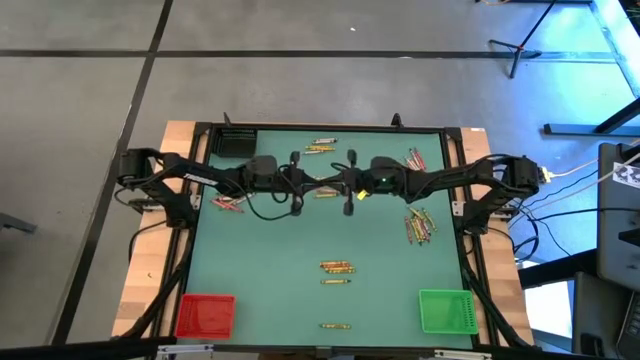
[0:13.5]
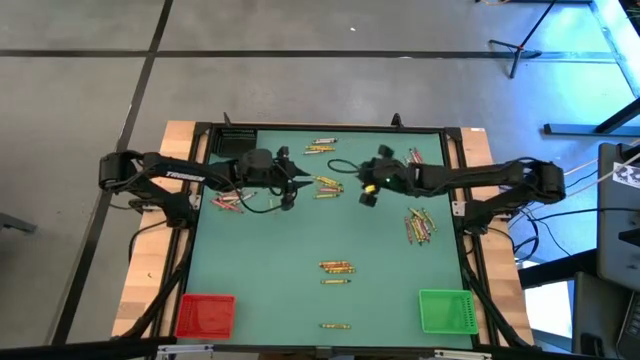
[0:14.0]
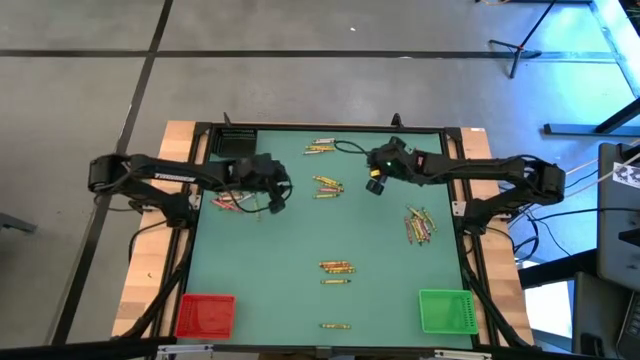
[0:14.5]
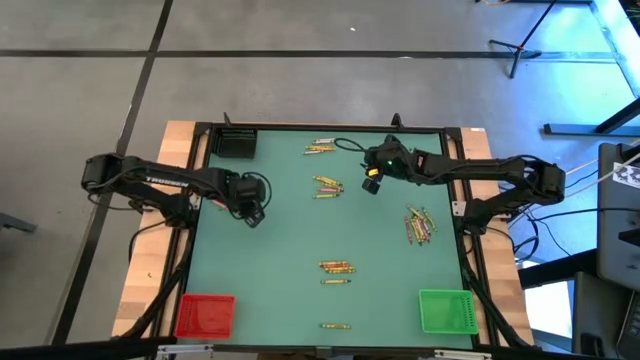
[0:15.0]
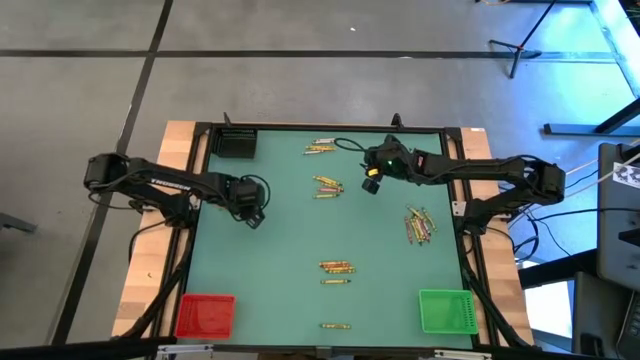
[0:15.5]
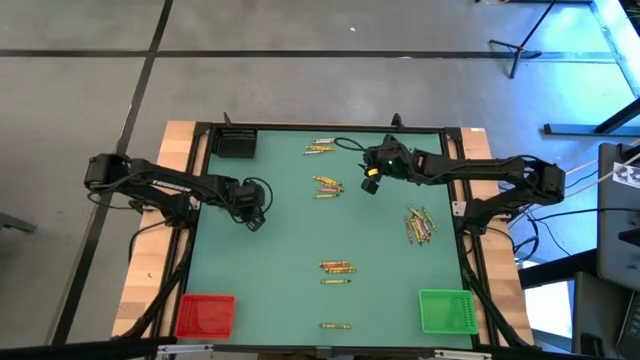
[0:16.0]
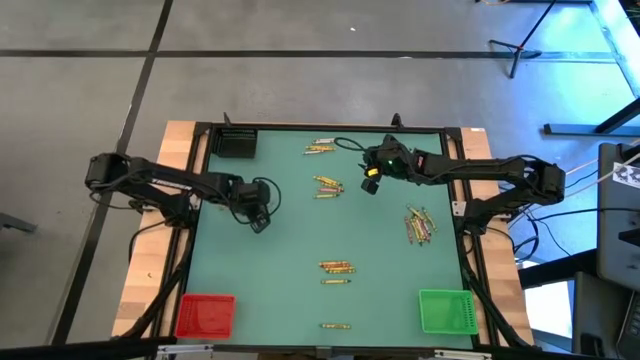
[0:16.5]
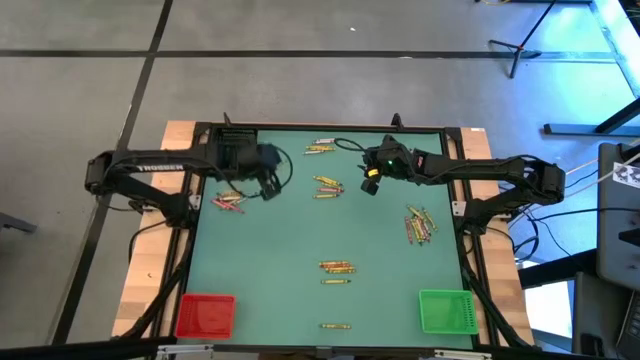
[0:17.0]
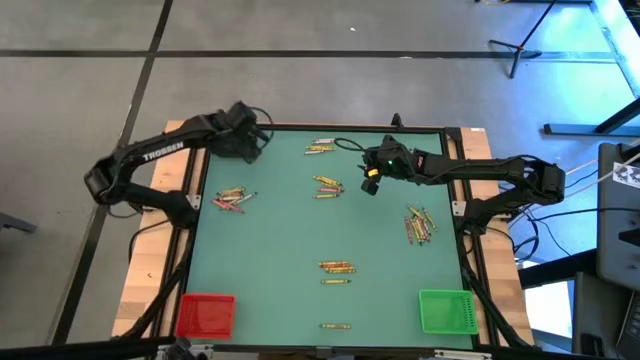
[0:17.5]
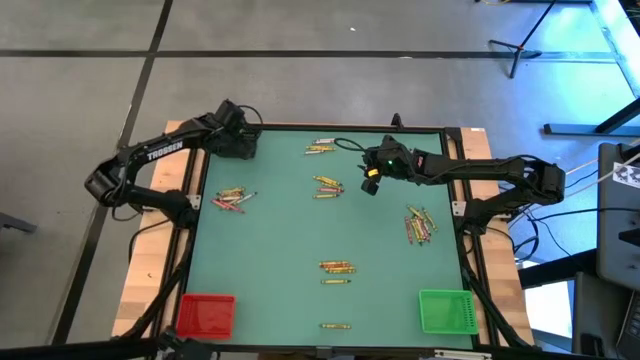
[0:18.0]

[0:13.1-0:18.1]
Task: Sort crayons
Put the green crayon into the black bin

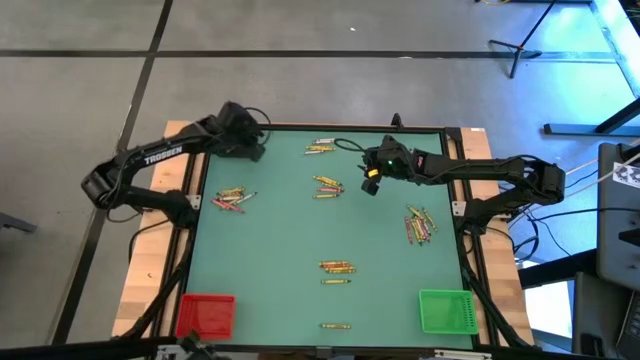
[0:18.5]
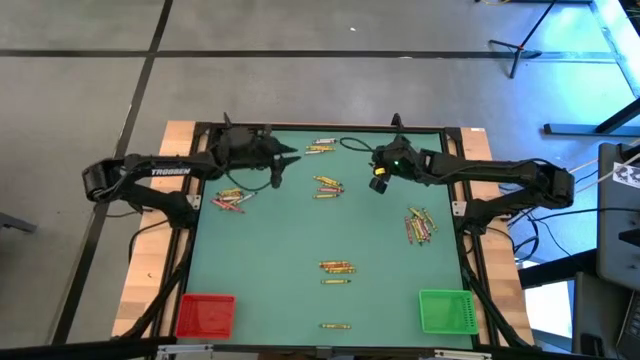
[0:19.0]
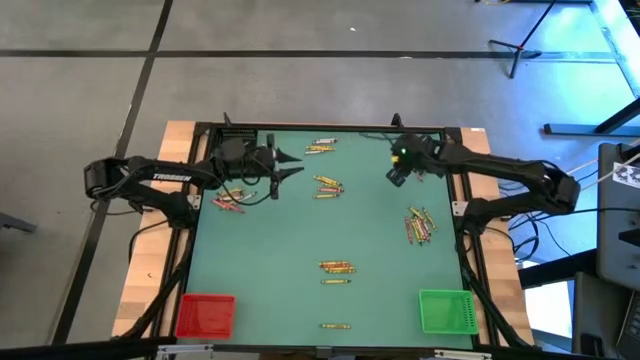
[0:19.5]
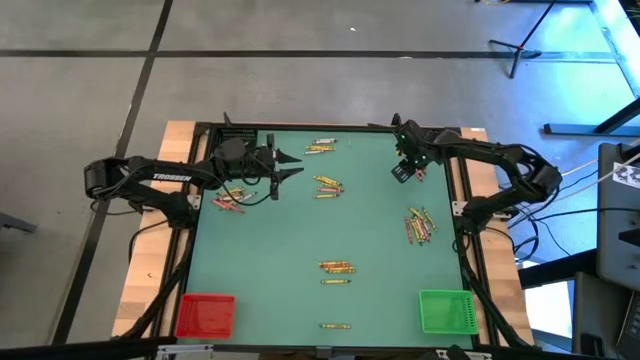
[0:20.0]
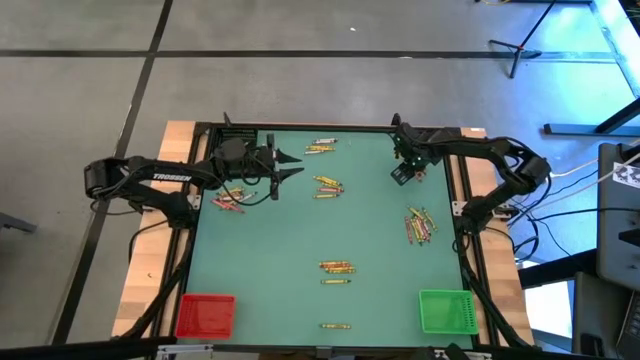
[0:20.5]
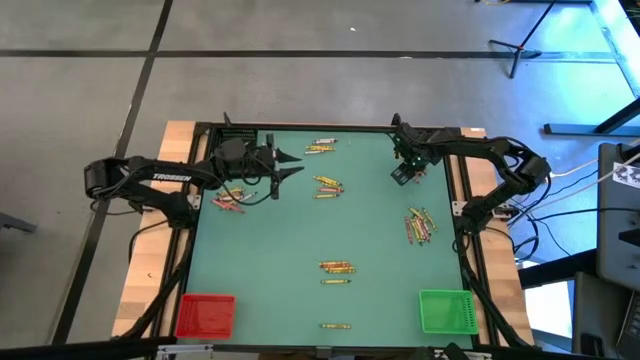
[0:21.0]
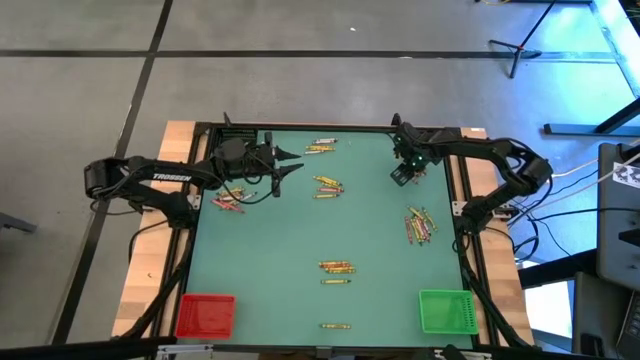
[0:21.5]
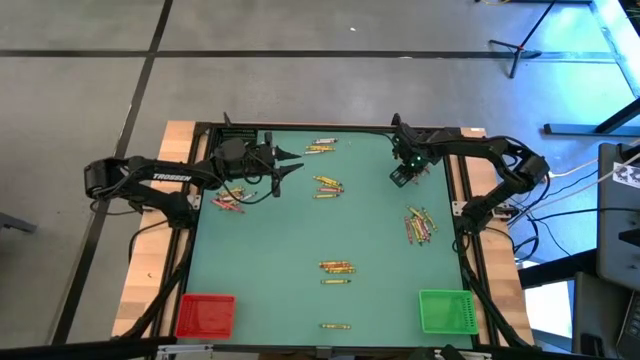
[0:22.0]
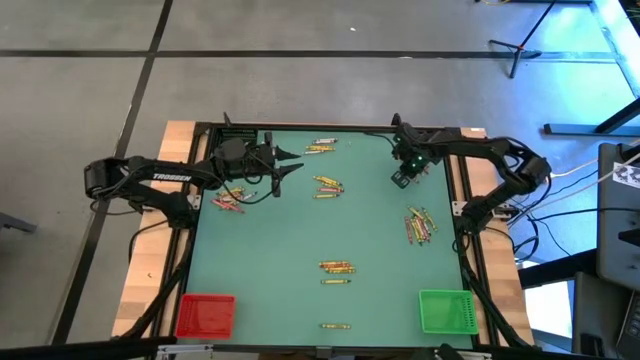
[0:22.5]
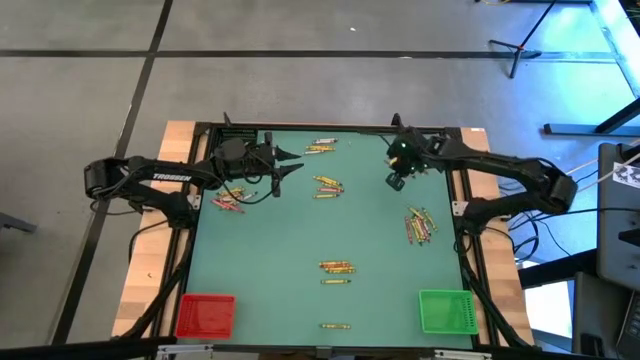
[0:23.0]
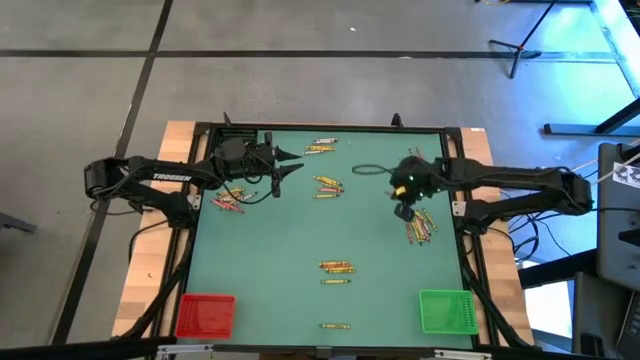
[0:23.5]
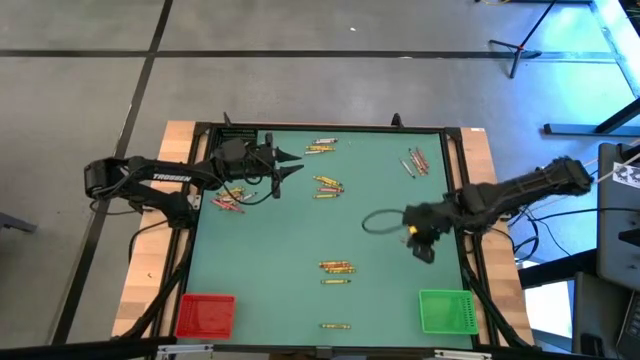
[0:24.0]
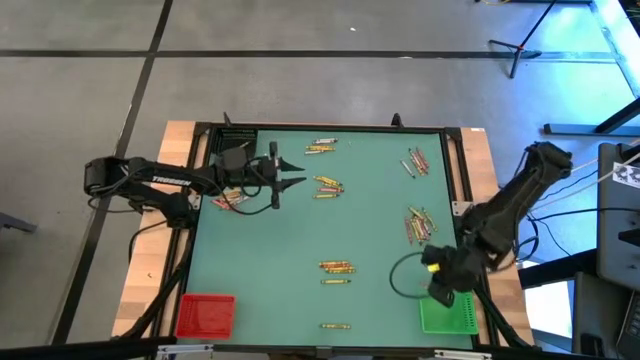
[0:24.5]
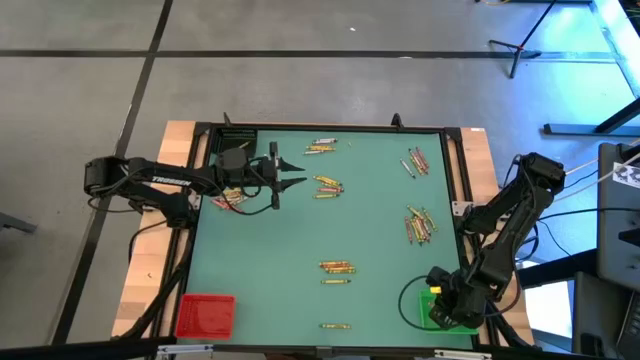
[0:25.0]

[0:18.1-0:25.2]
Put the red crayon into the green bin

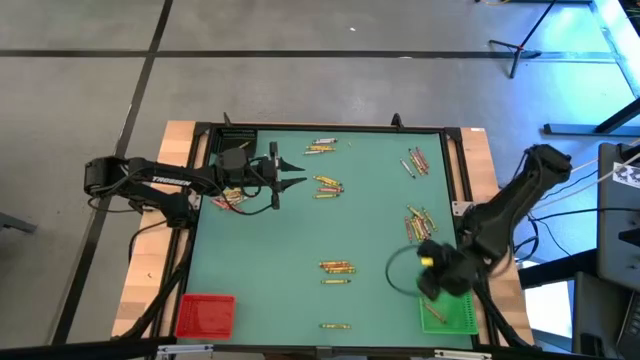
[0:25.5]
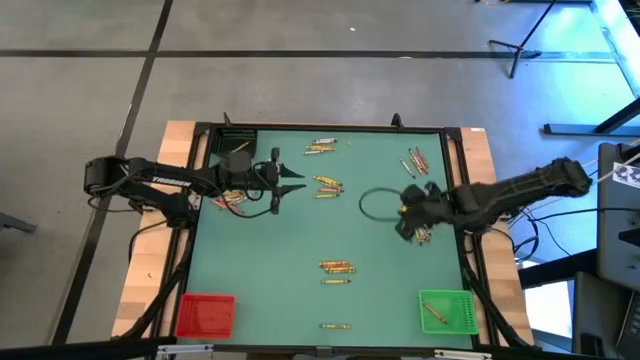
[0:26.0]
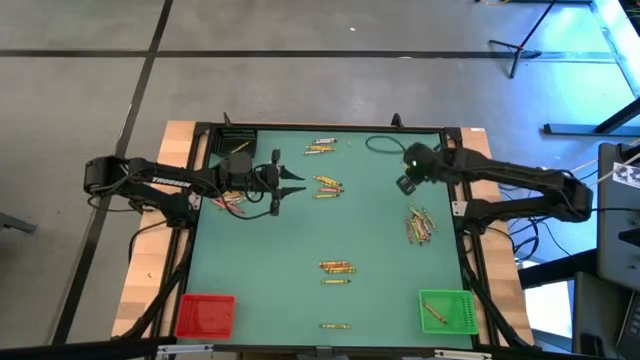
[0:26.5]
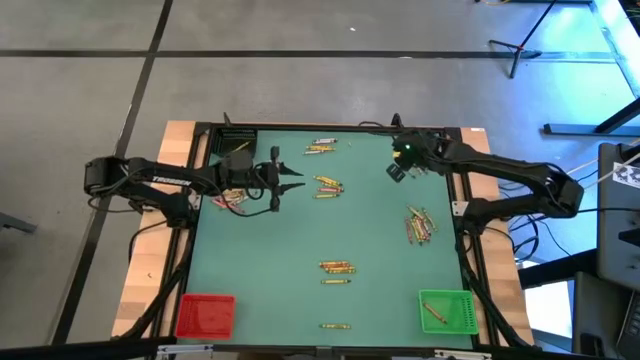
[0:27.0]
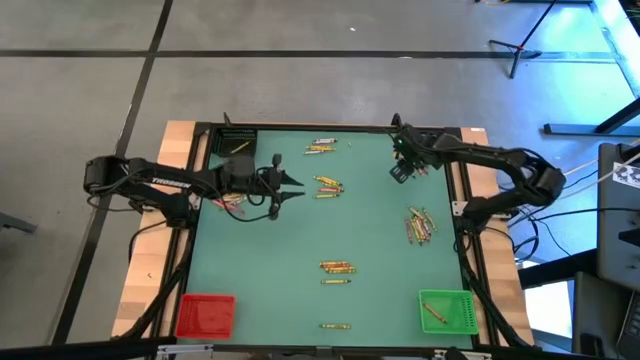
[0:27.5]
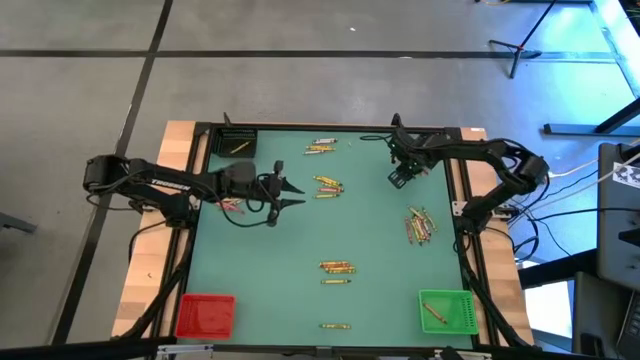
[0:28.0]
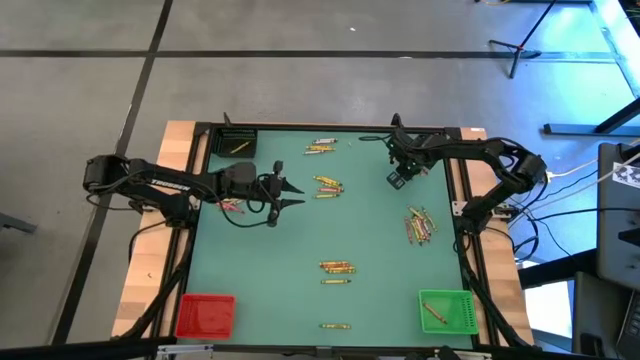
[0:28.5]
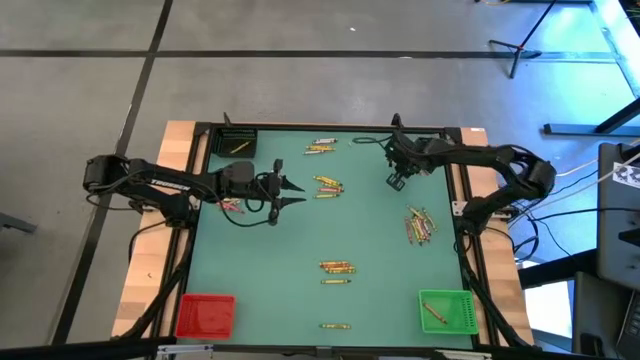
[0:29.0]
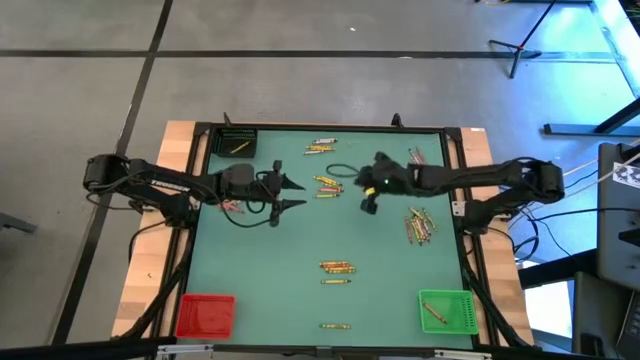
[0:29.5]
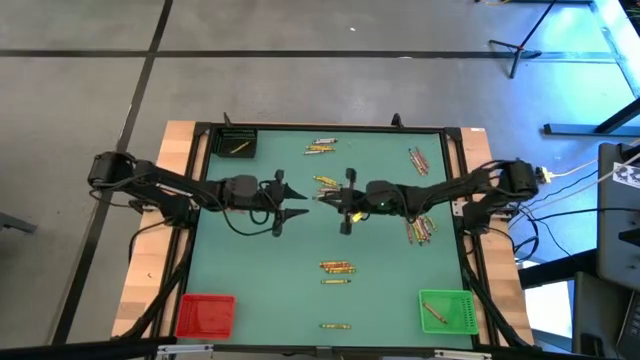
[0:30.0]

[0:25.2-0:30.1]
Put the black crayon into the red bin

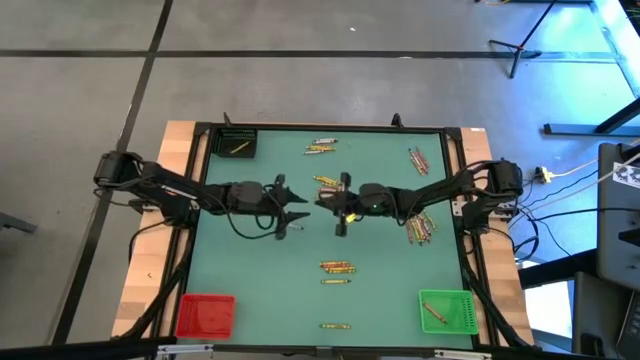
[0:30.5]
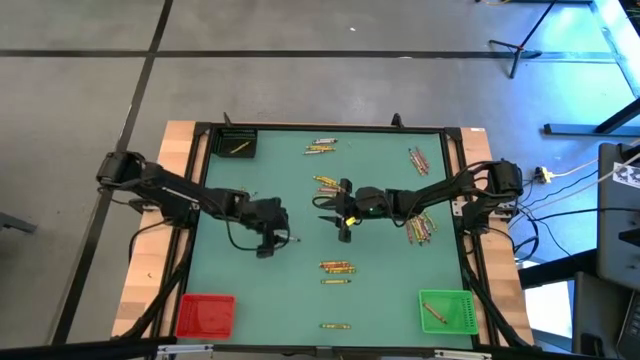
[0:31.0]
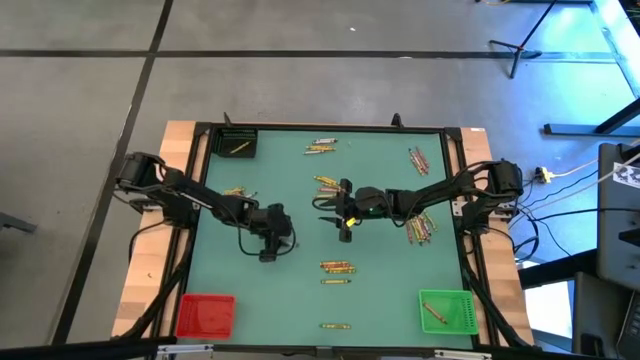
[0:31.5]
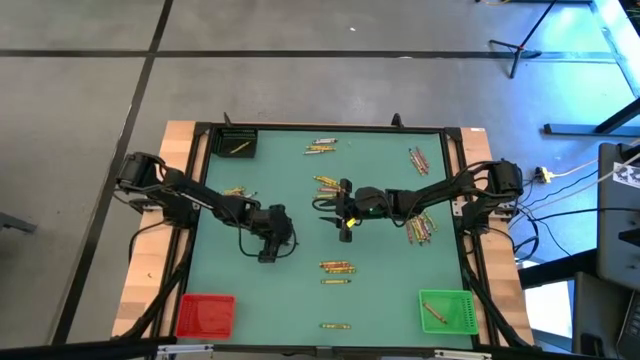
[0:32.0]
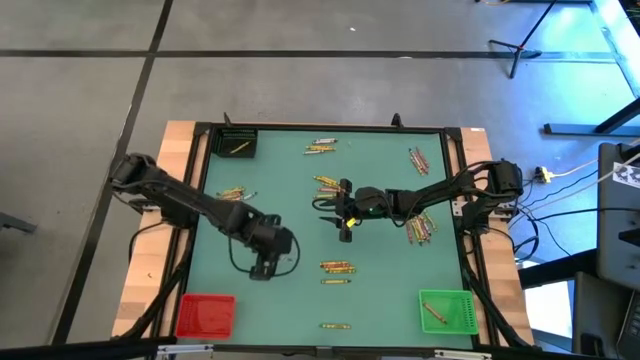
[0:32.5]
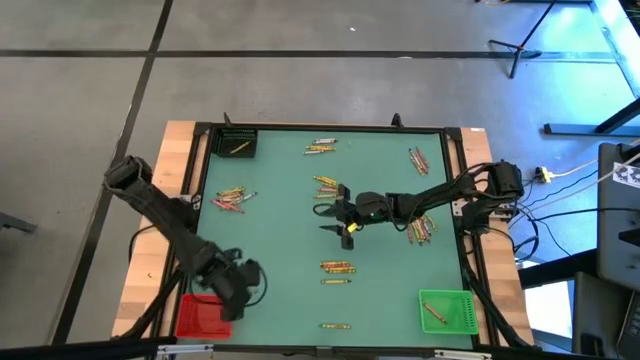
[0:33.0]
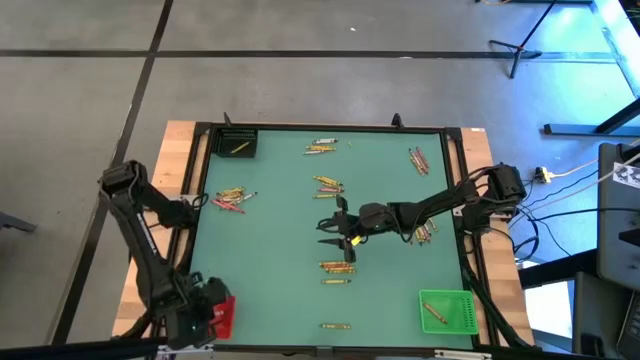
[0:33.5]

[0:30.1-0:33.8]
Put the black crayon into the red bin

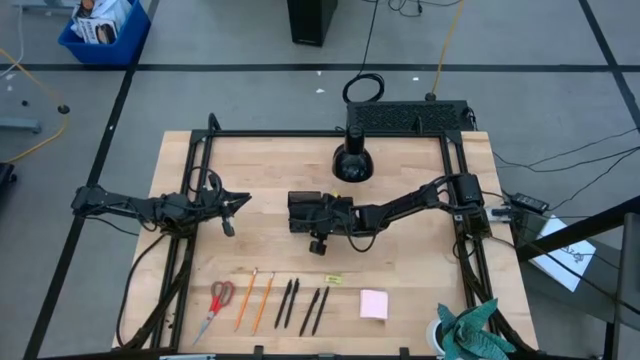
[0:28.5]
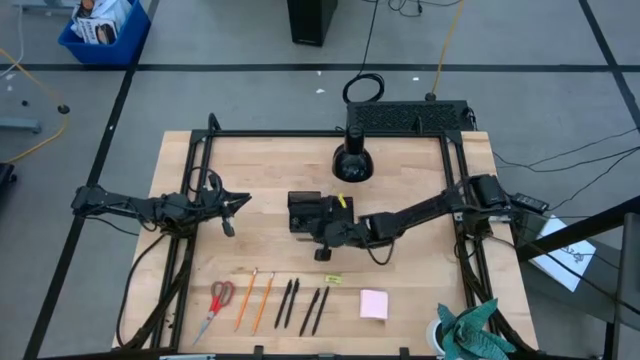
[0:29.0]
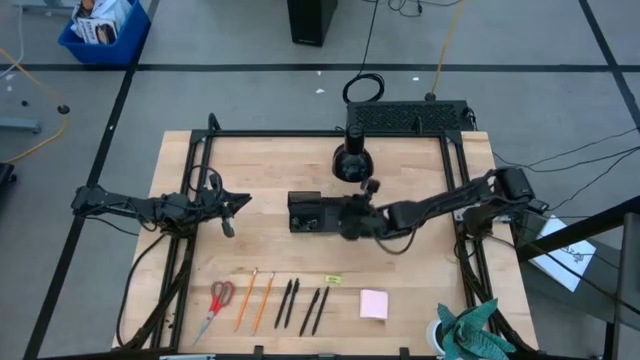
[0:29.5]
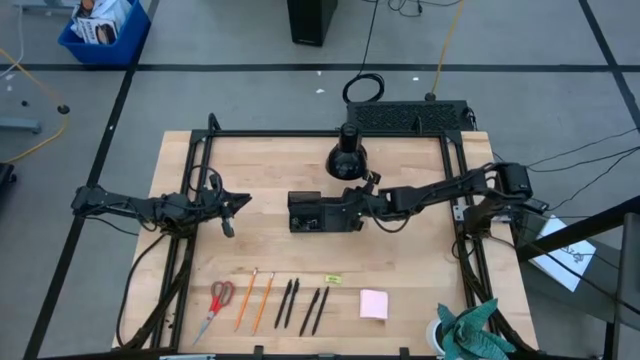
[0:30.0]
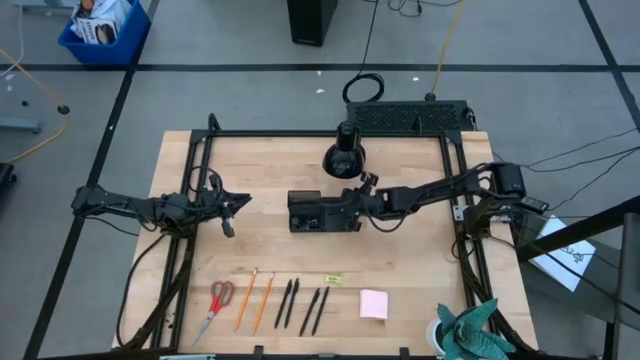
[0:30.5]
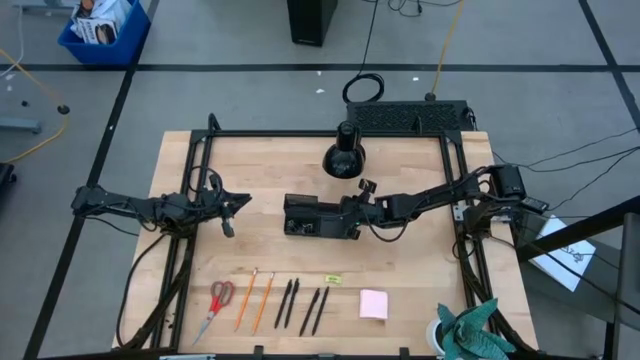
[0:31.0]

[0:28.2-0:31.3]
Task: Pick and place office supplies into organizer
Adjust the desk organizer on the table
